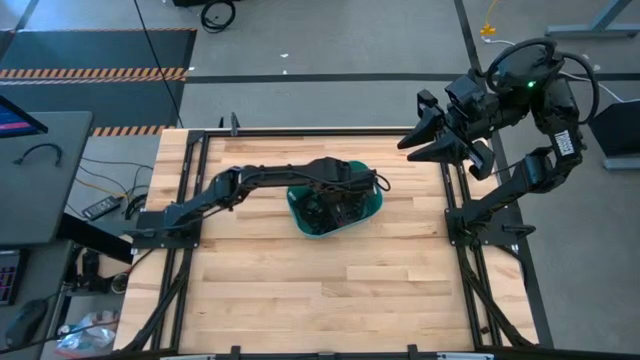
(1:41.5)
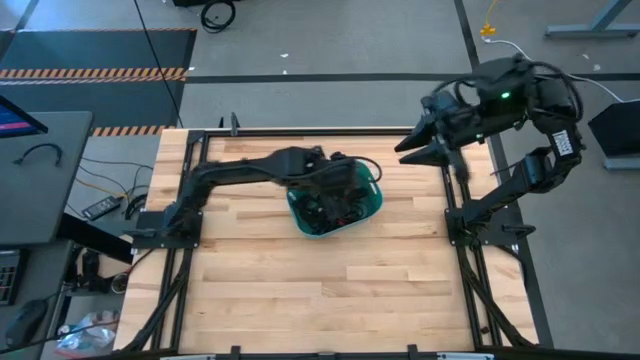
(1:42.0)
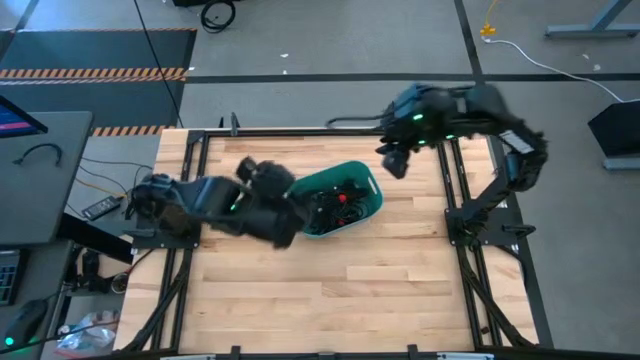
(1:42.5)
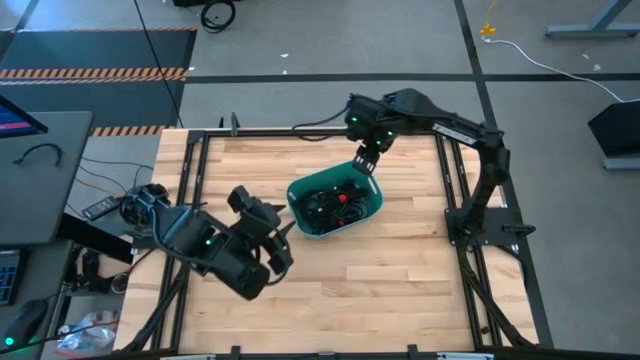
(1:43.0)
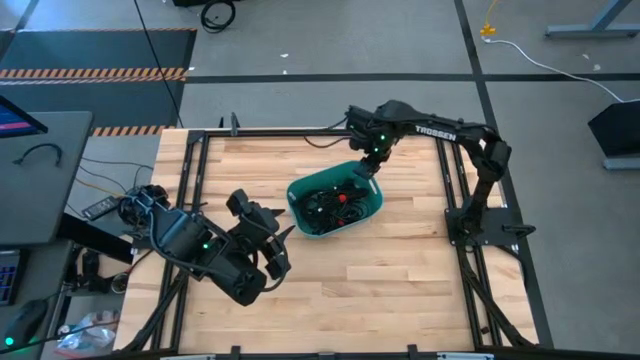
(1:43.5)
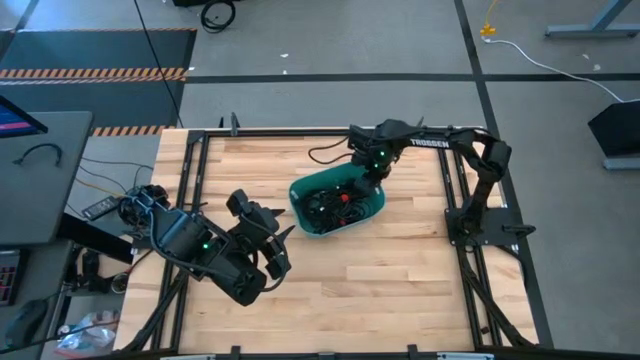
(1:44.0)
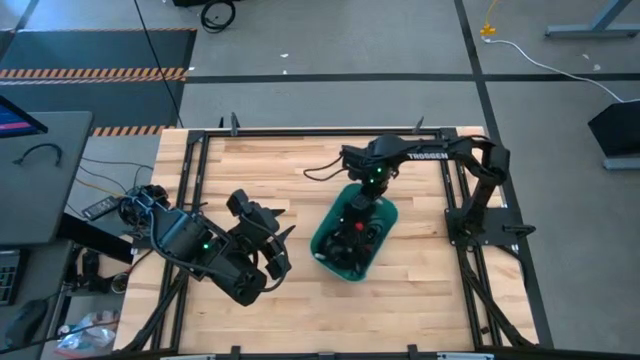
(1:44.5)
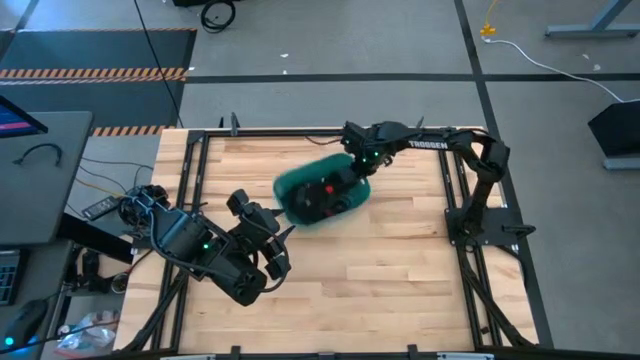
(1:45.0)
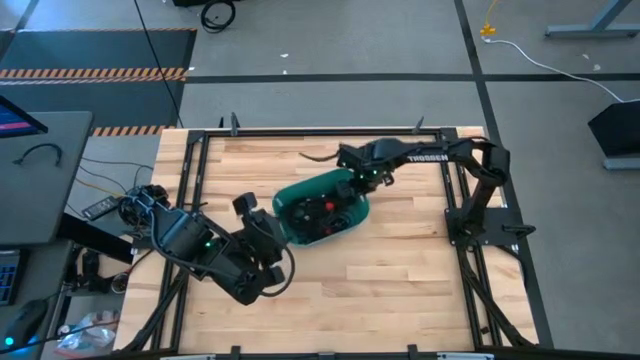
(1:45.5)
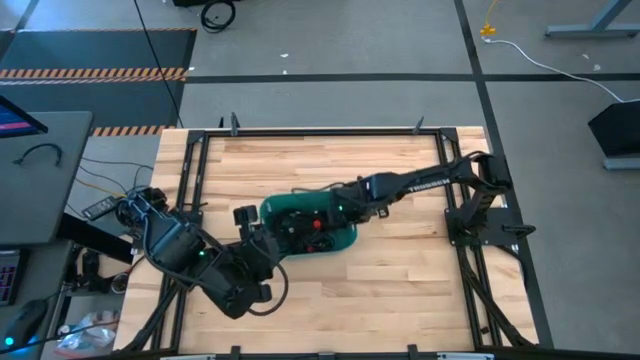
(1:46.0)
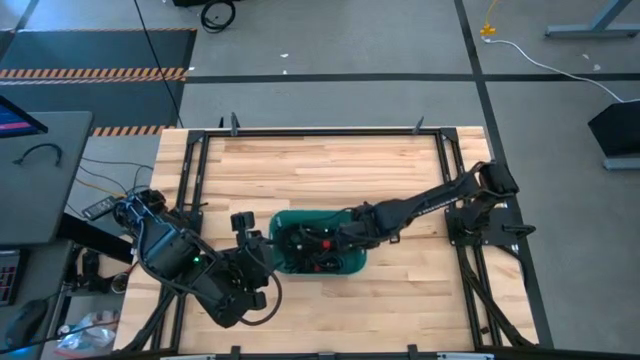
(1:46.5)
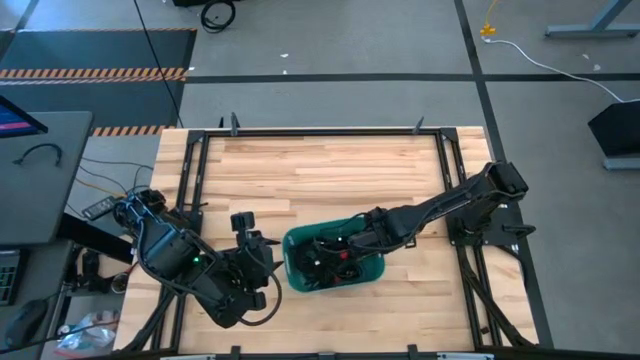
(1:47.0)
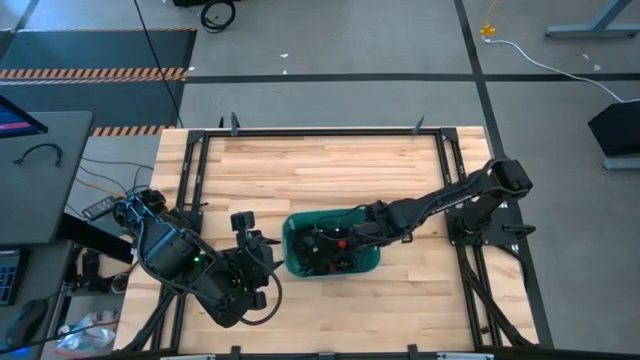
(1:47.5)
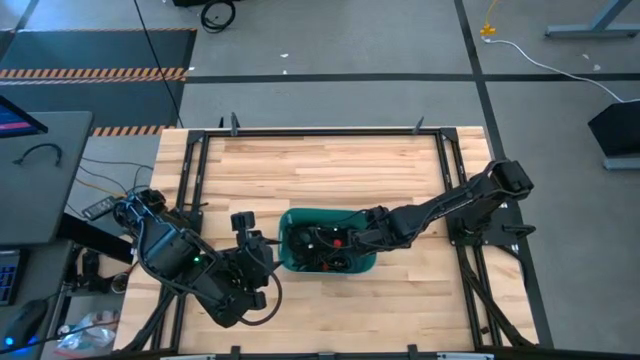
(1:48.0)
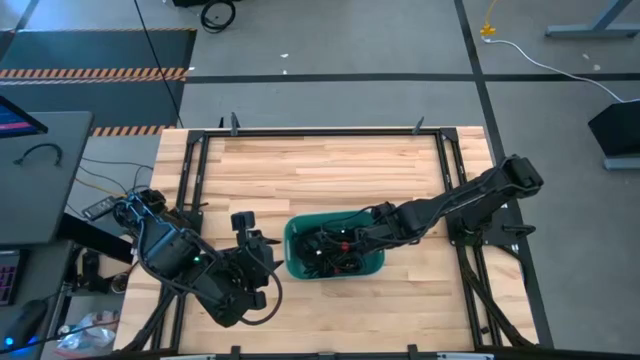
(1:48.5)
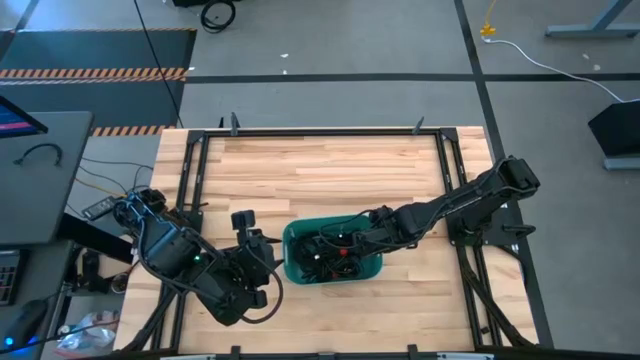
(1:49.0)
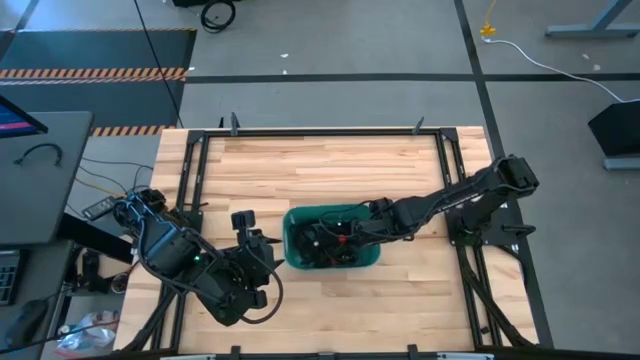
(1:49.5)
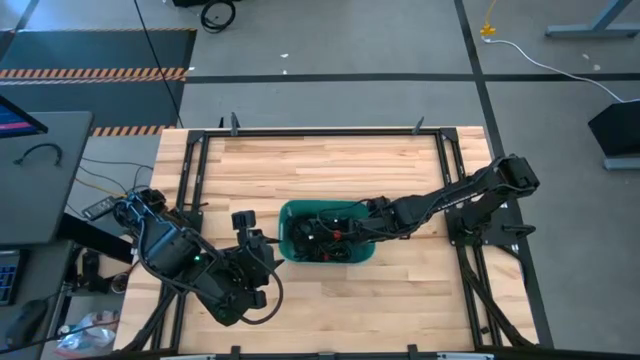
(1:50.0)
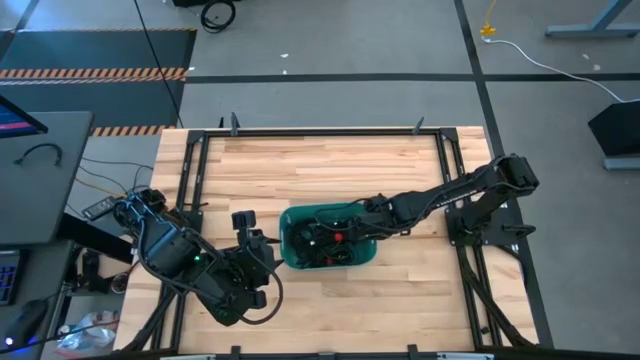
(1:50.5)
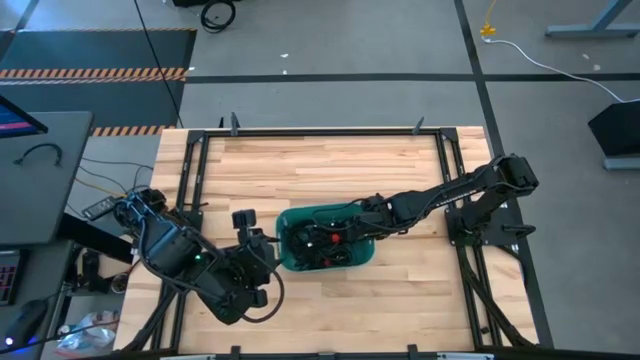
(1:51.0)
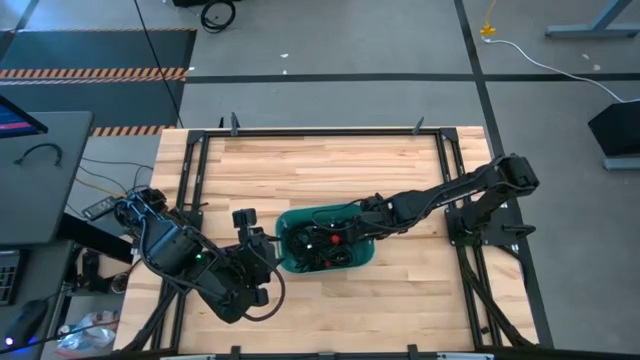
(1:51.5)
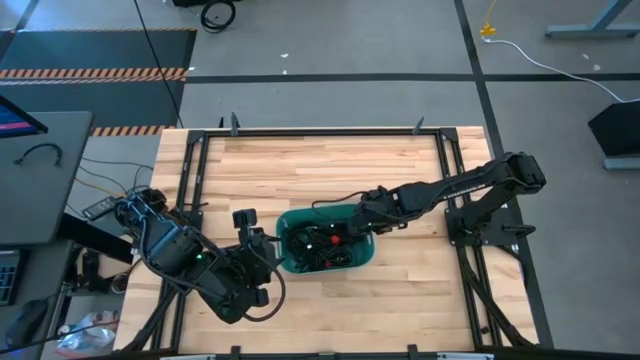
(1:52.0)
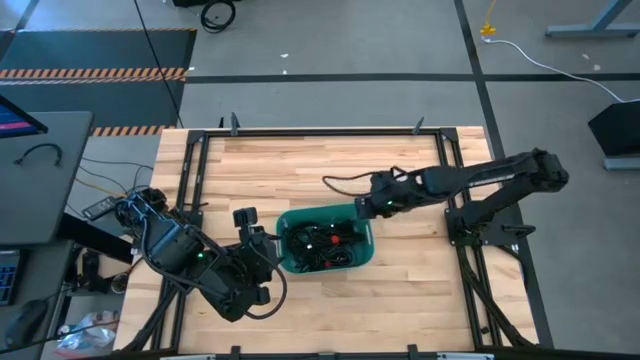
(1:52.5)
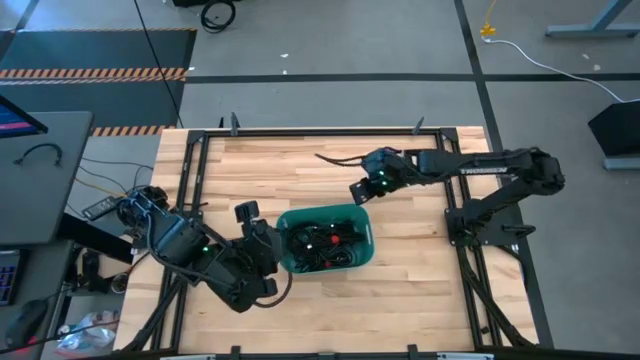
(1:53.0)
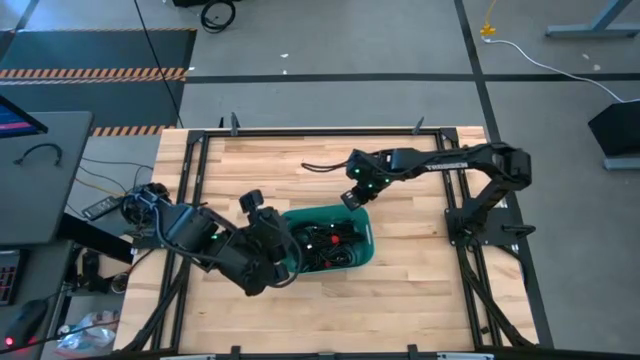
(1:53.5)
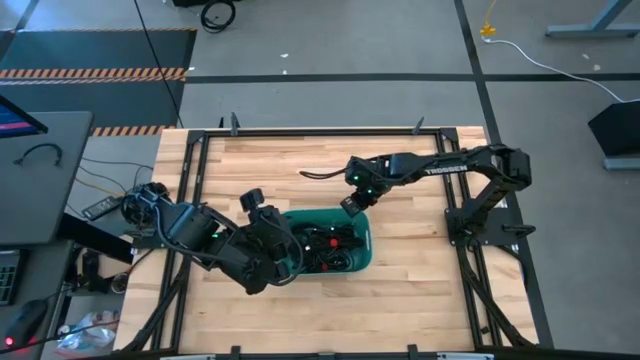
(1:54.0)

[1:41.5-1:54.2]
Task: Pick and place USB-C Cables
Adjust the green bin on the table

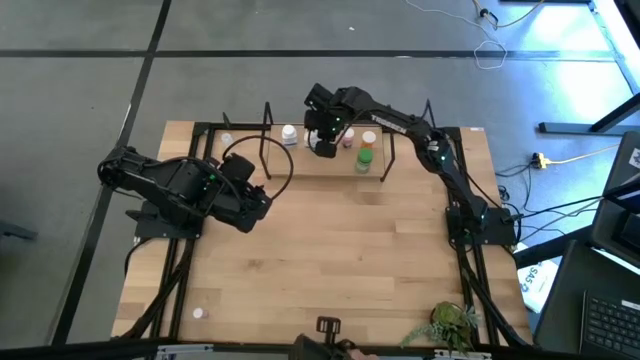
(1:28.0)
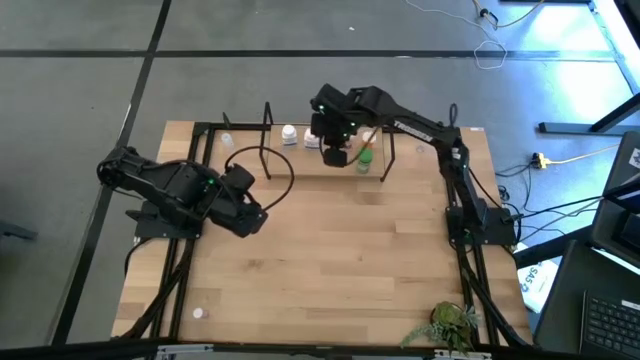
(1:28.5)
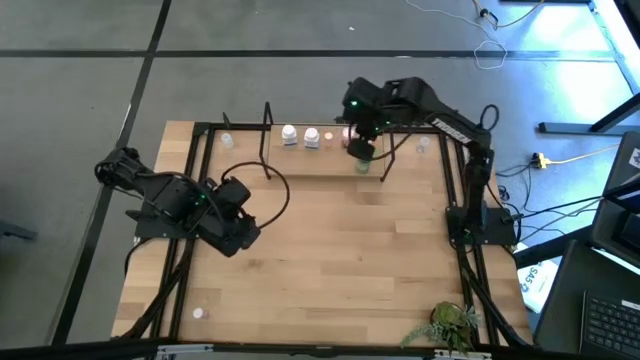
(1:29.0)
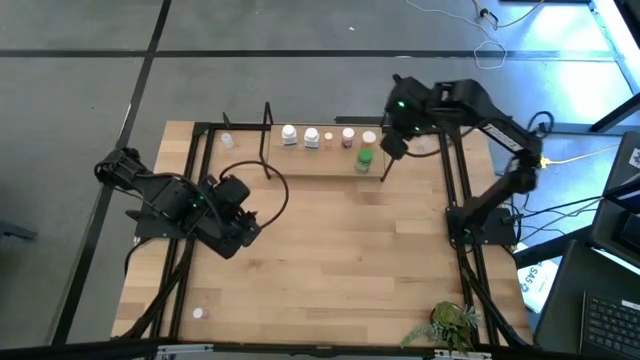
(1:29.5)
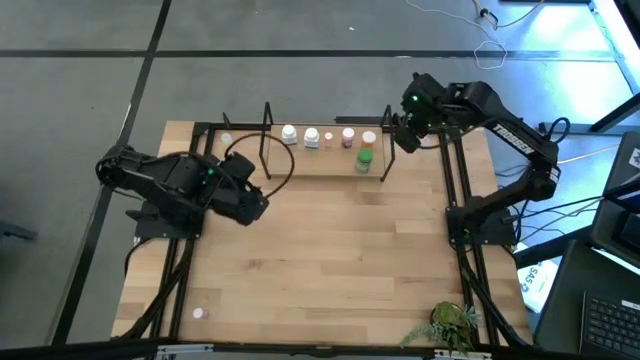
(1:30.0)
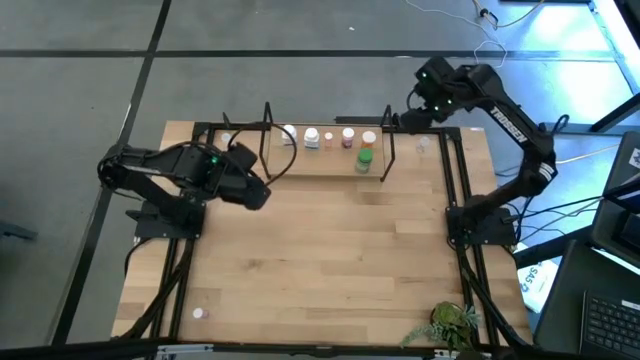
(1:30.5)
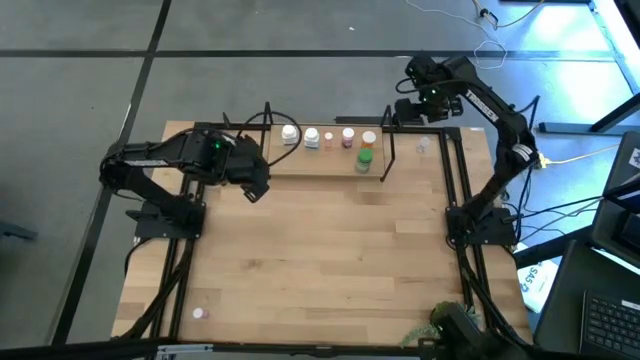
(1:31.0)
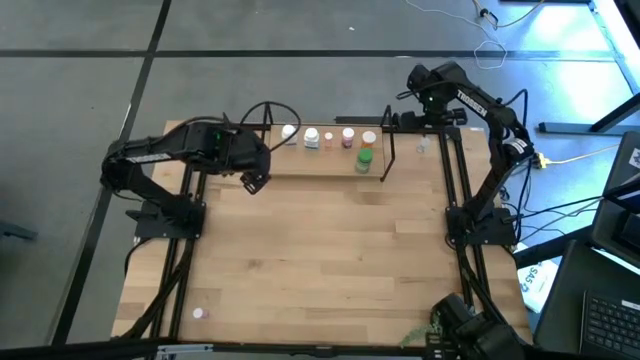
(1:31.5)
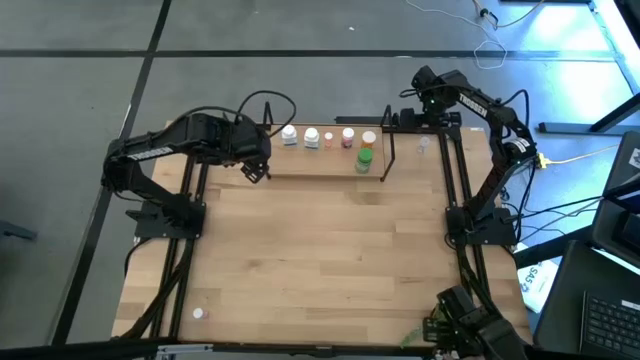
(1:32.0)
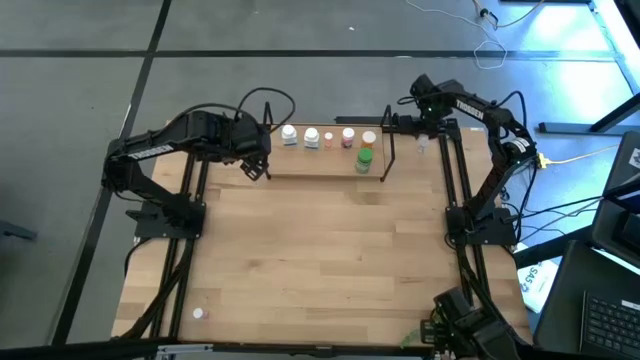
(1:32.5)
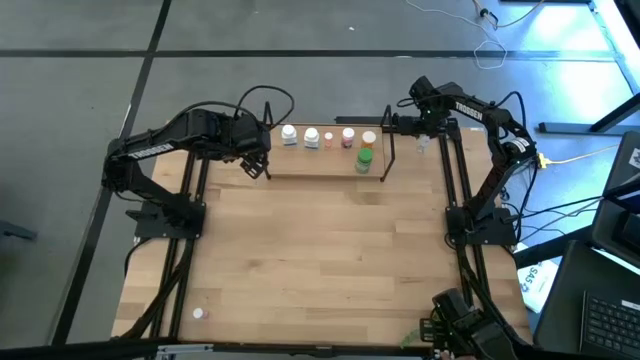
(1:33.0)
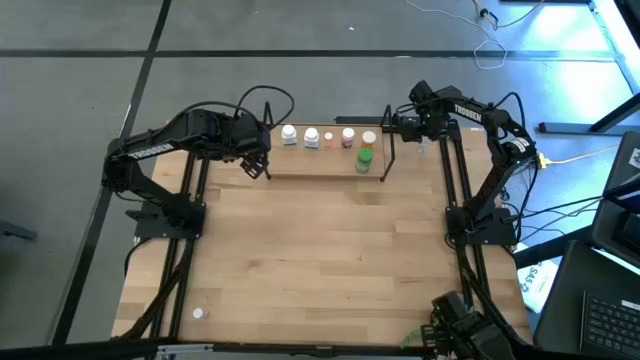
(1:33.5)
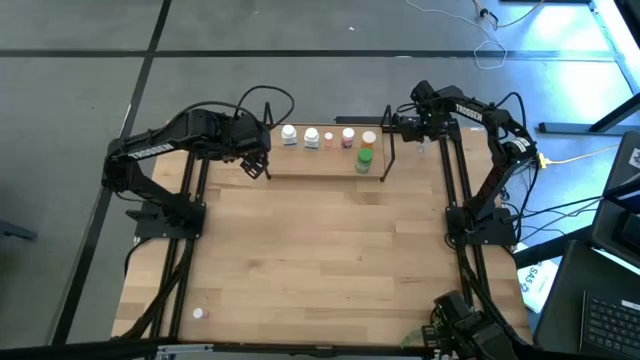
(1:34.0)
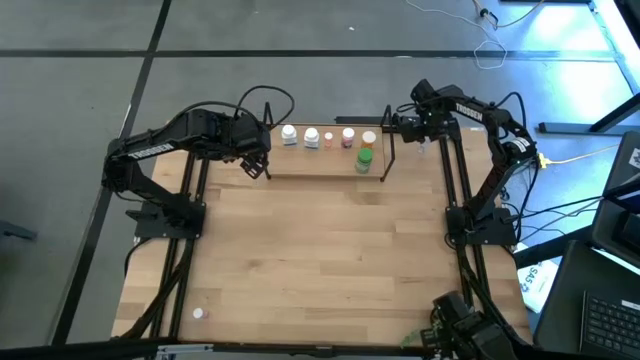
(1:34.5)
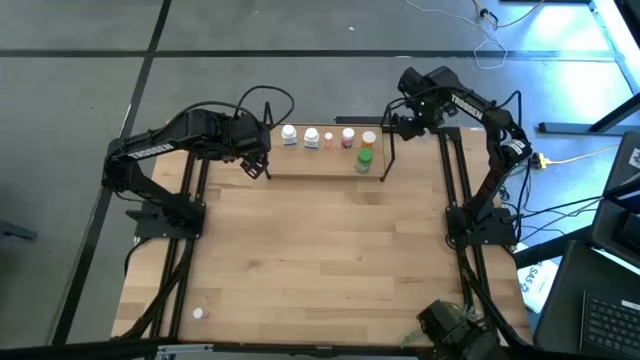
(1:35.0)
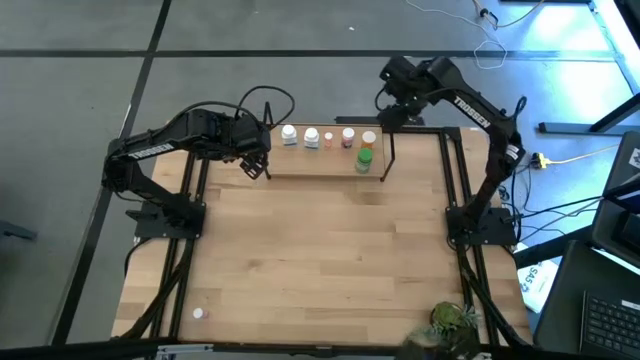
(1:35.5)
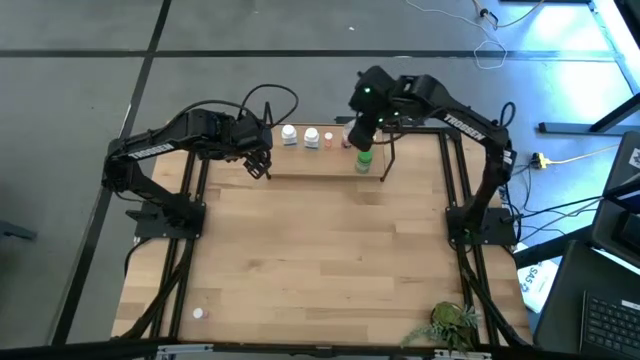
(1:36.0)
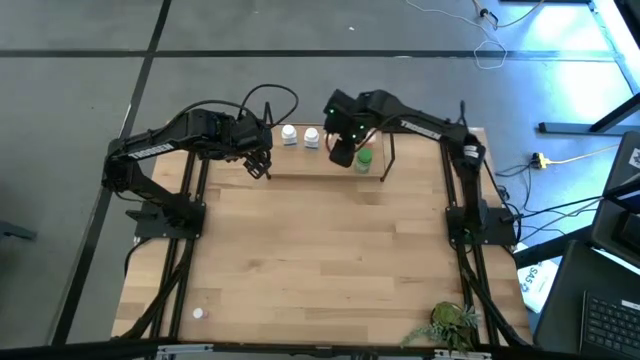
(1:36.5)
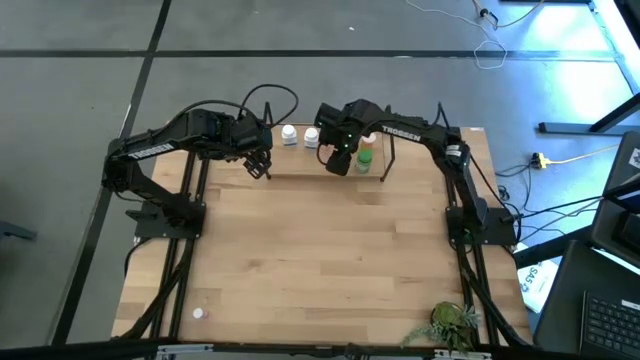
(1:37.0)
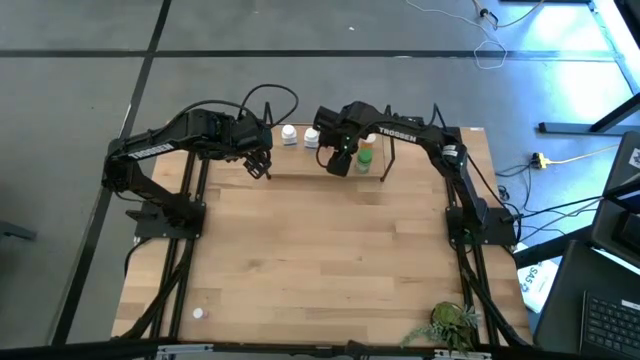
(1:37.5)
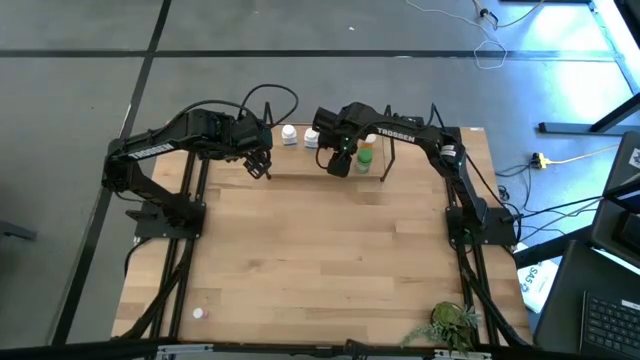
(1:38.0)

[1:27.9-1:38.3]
Task: Pick and place medicine bottles onto shelf by color
Put the right transparent pill bottle on the shelf
